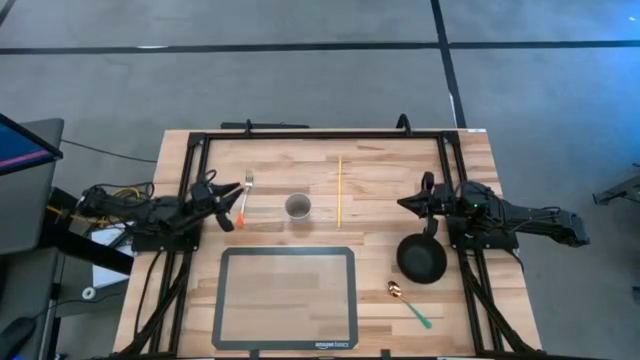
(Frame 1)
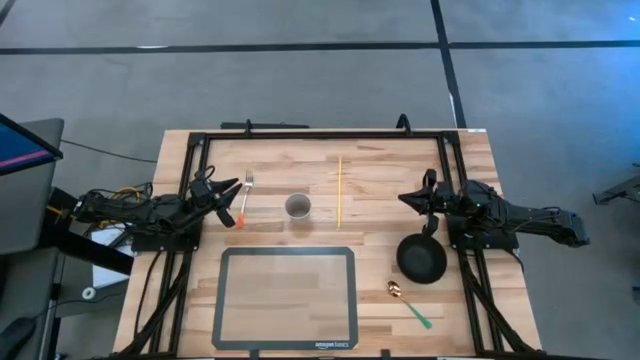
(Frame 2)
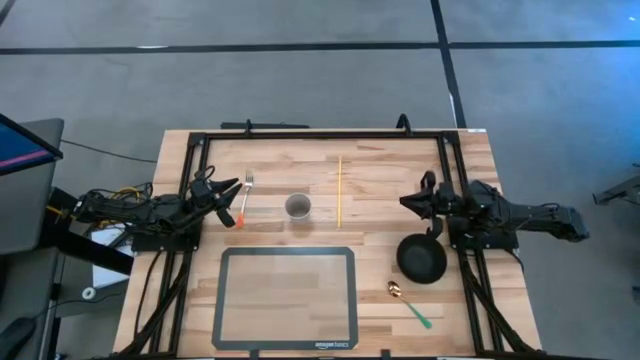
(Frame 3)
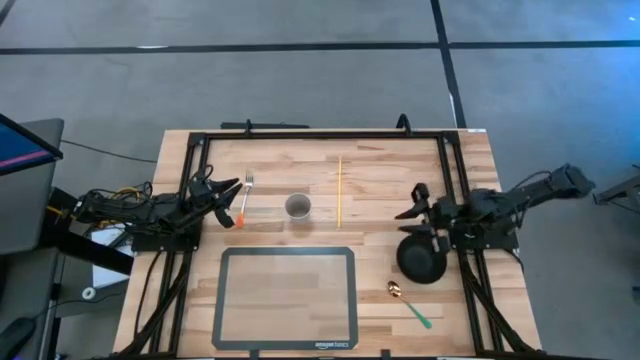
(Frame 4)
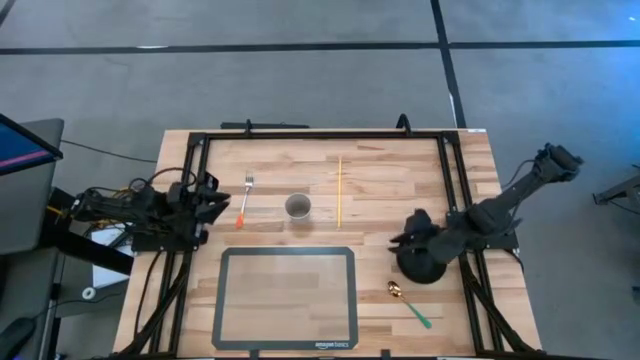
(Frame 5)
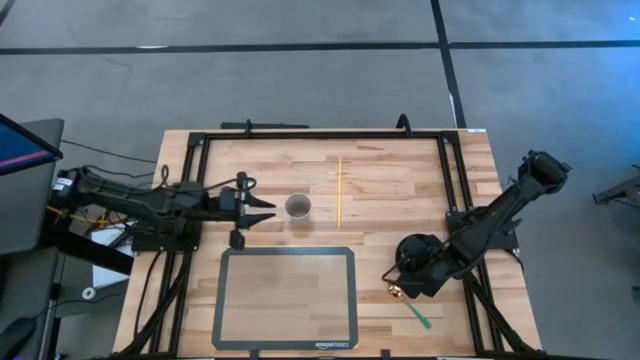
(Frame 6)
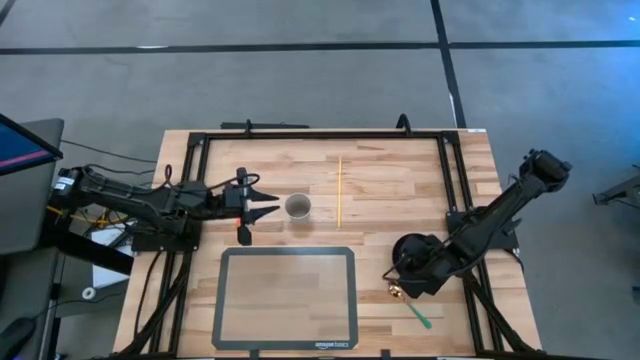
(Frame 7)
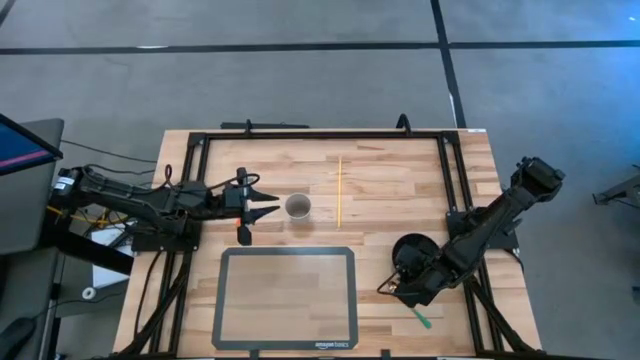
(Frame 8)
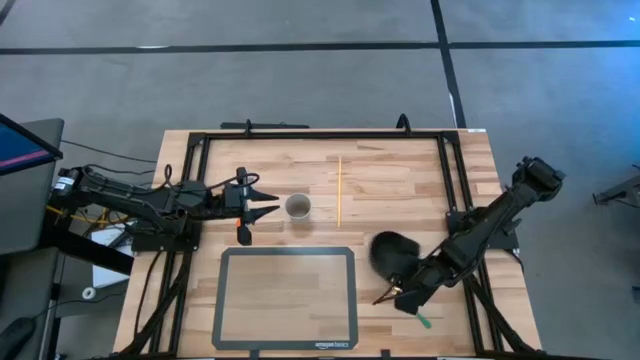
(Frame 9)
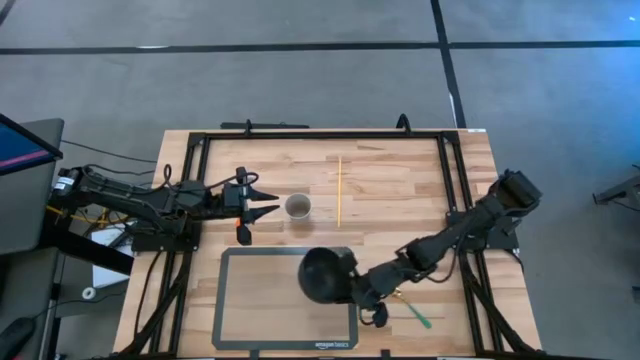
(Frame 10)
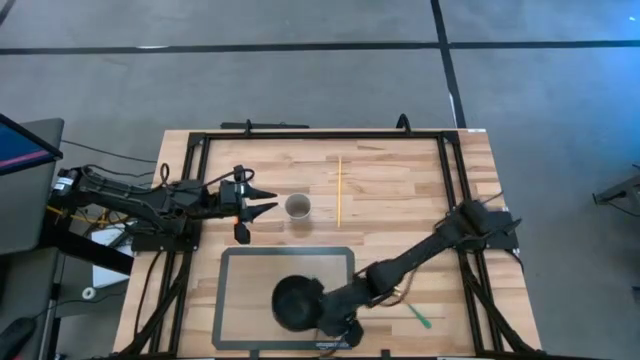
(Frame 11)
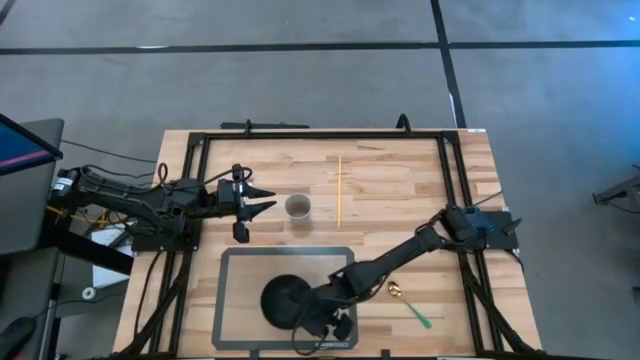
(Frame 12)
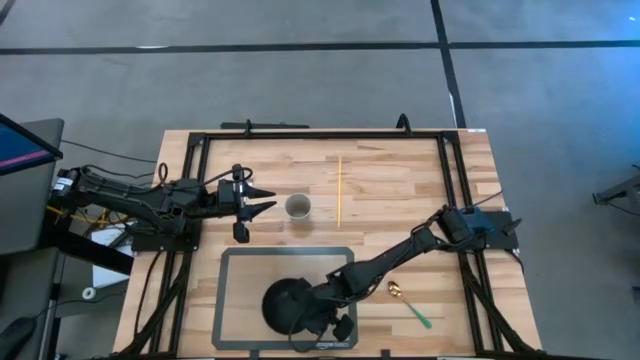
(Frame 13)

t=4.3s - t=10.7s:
Task: Pick & Place Utensil
Put the black bowl on the transparent mat

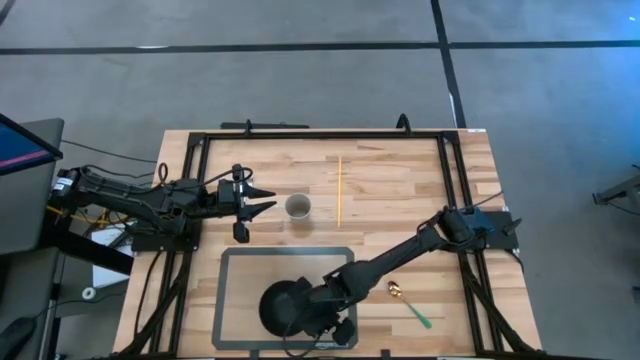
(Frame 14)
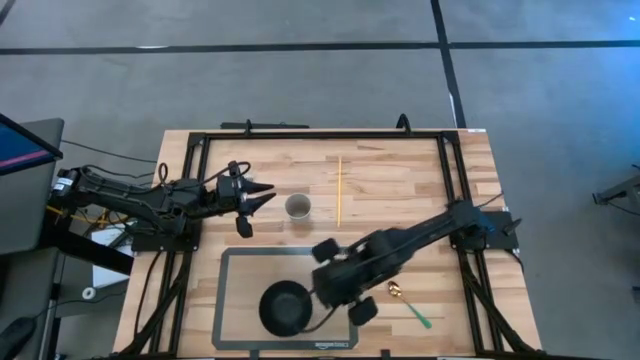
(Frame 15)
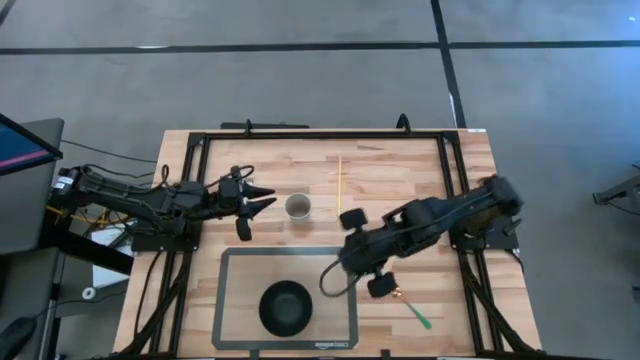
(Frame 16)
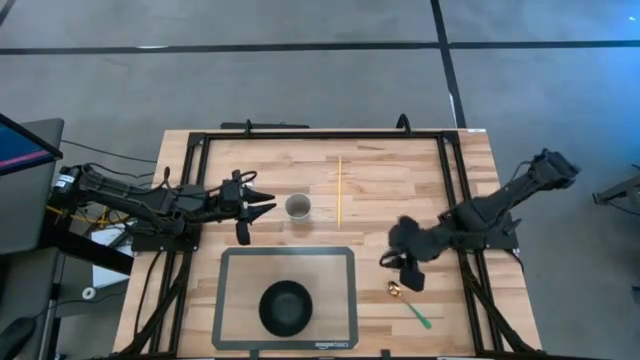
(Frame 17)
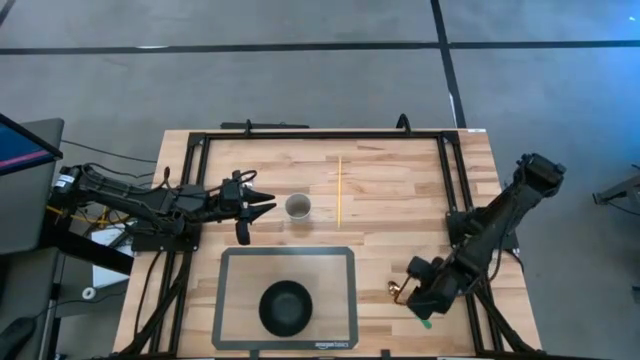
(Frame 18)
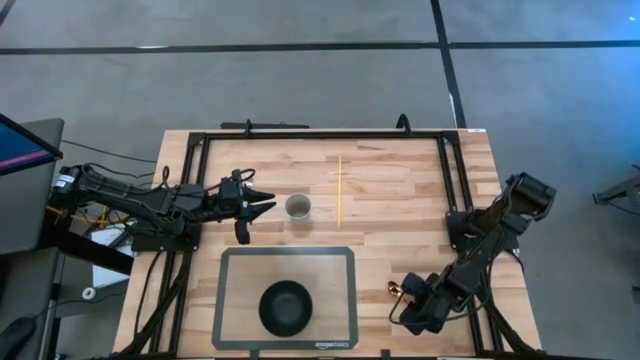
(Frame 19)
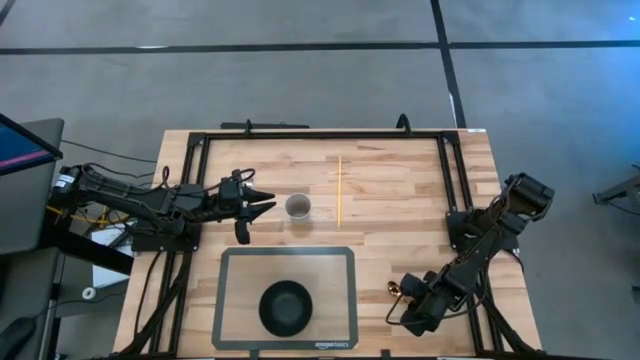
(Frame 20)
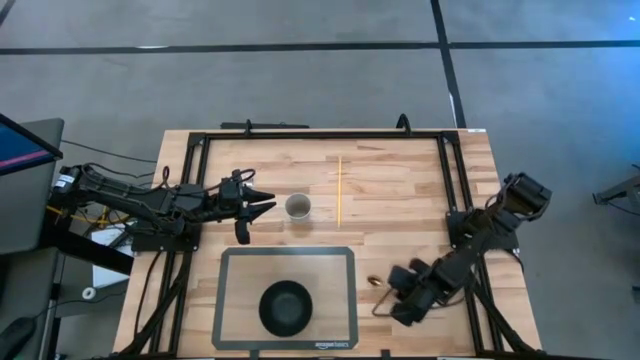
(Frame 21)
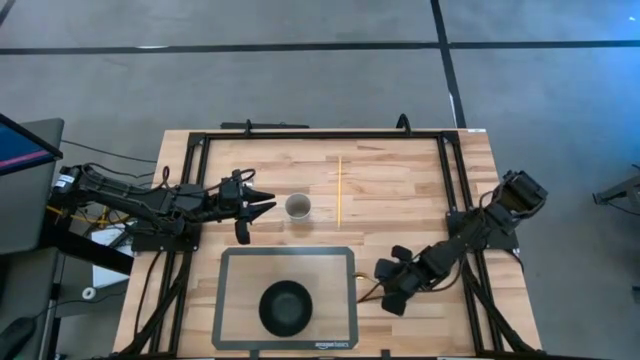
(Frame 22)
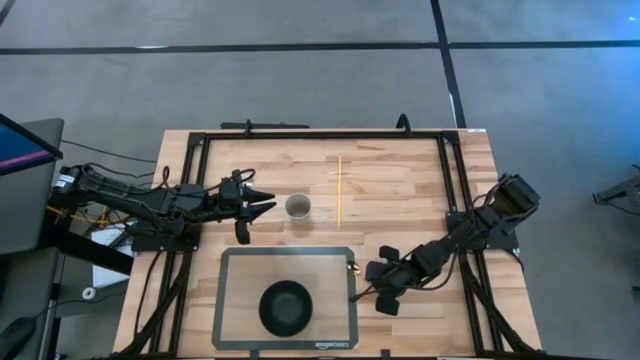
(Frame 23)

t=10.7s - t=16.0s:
Put the green spoon into the black bowl

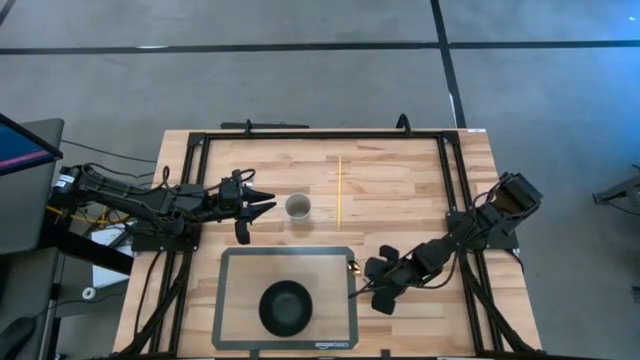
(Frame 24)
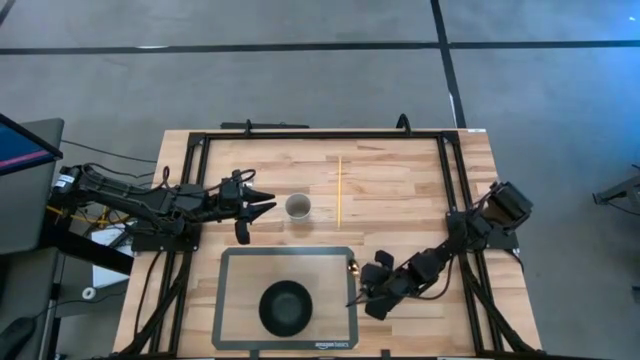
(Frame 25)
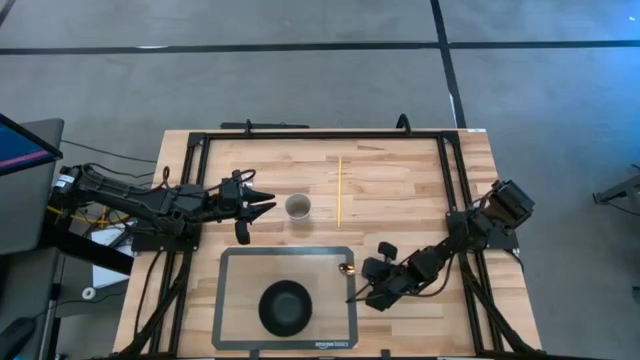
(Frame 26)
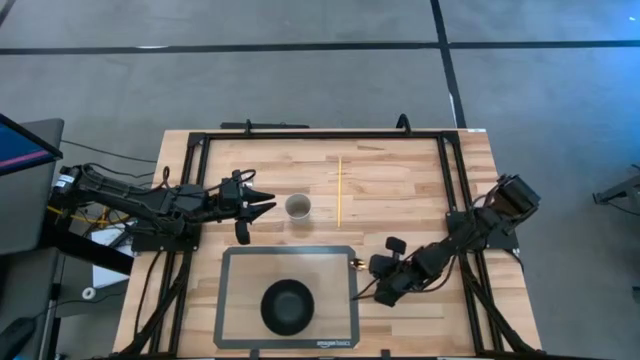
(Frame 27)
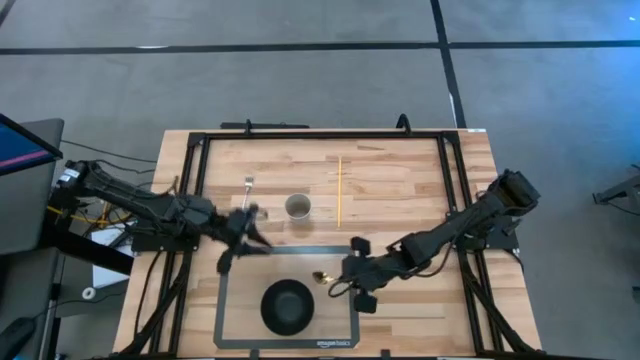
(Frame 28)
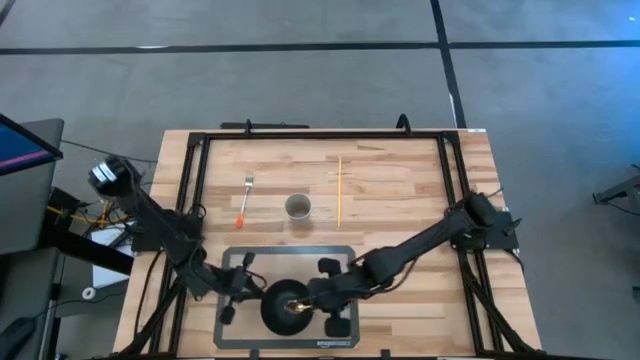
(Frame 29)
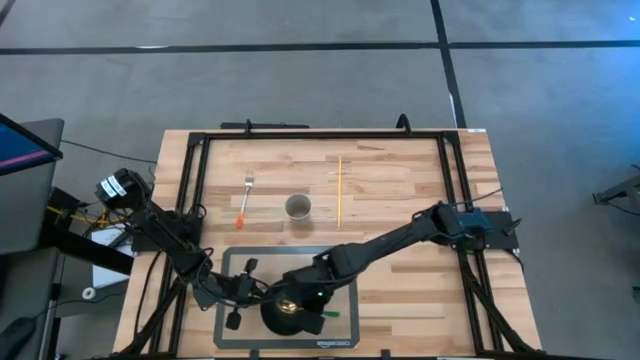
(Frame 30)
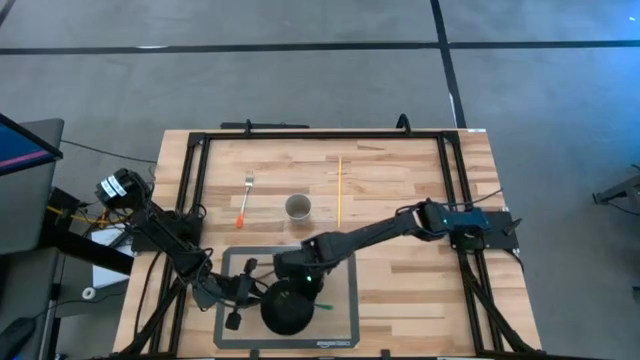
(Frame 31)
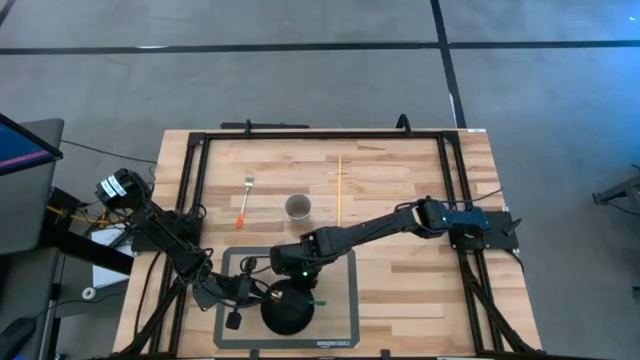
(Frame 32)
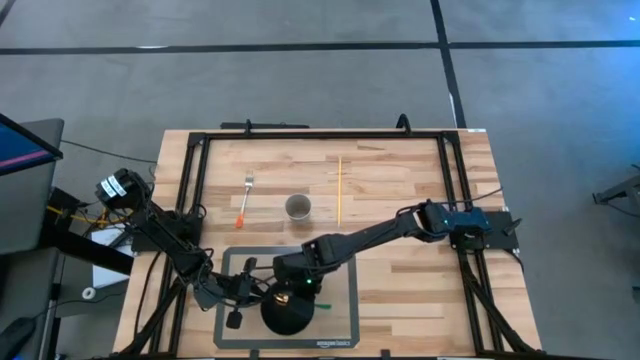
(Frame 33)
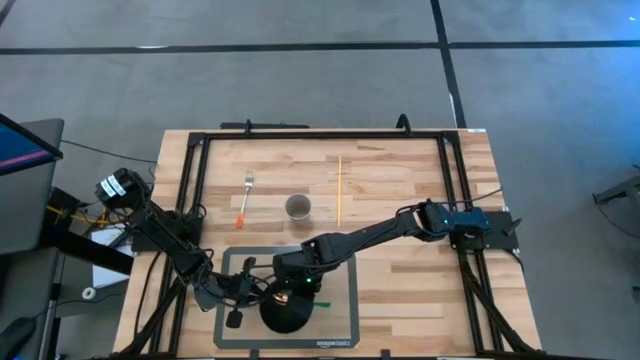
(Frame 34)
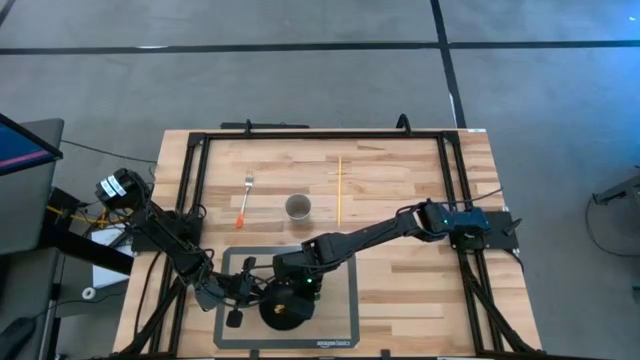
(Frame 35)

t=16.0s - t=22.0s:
Put the green spoon into the black bowl

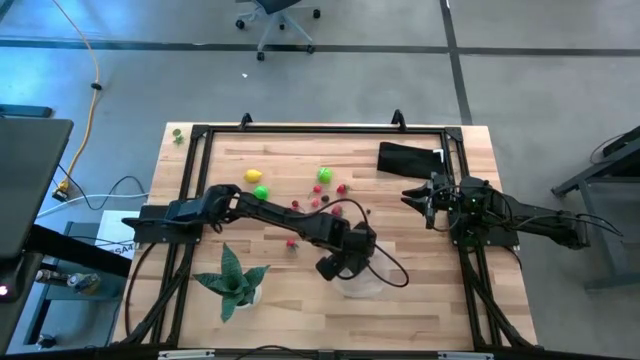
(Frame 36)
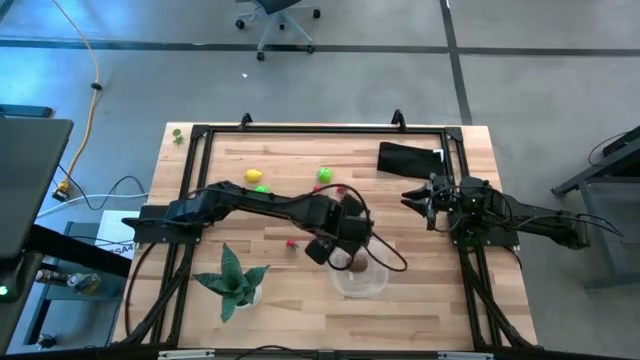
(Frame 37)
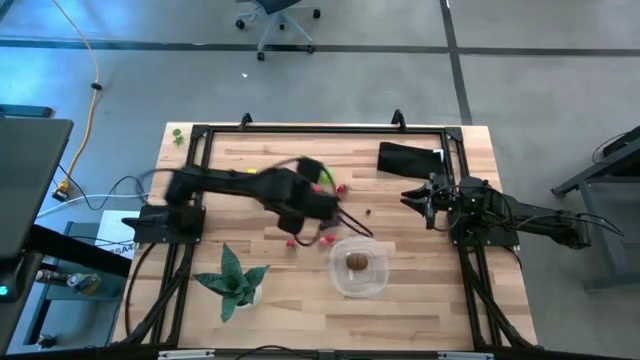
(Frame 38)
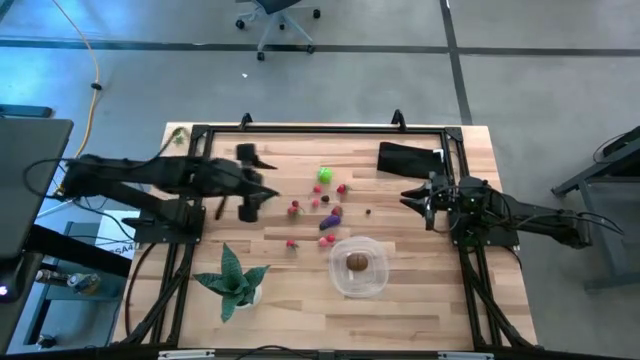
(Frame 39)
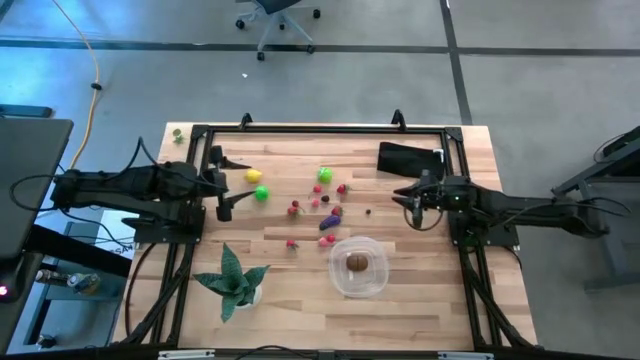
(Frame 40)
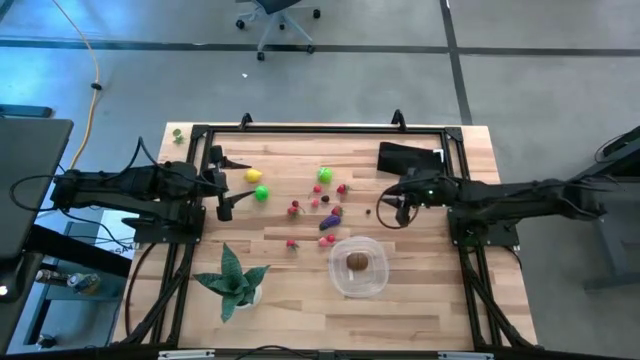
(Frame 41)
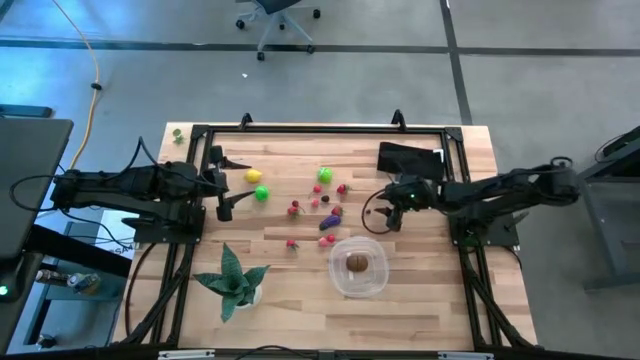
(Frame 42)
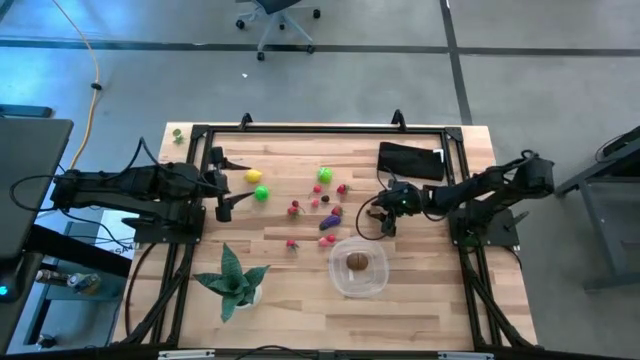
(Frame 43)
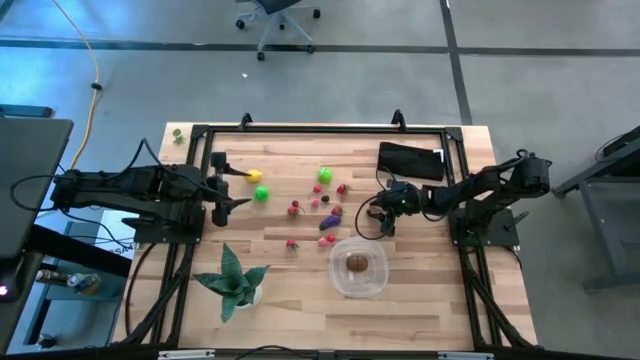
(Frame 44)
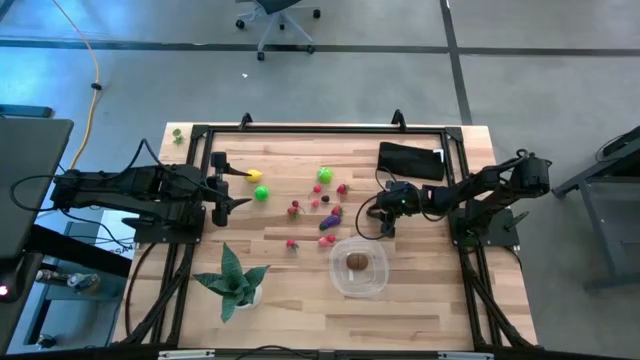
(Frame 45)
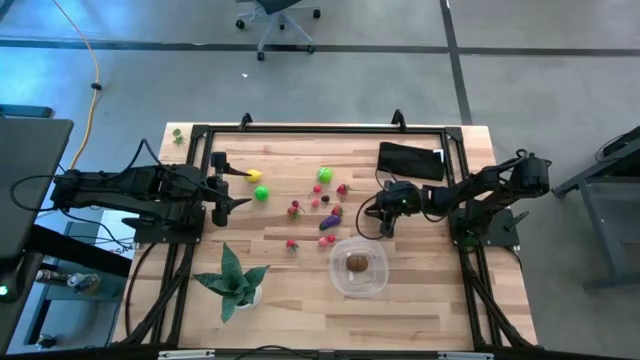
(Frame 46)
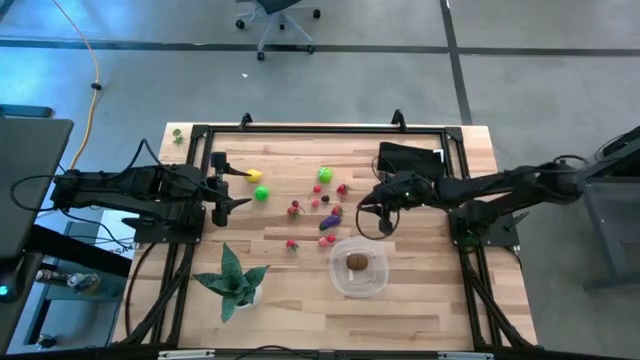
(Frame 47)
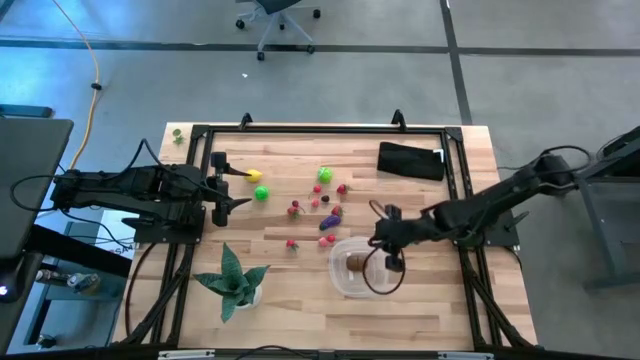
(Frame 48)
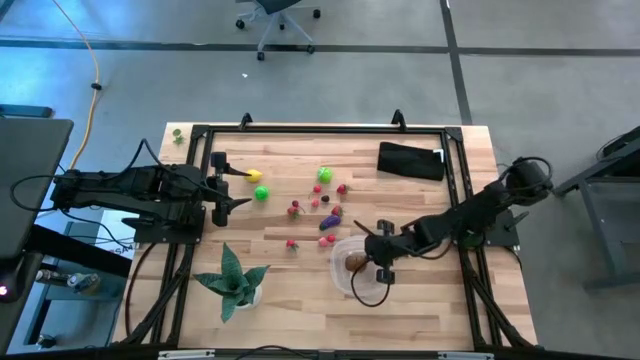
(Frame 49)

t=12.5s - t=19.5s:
Task: Pick and placing Produce into tupperware
Put the blueberry into the transparent bin
